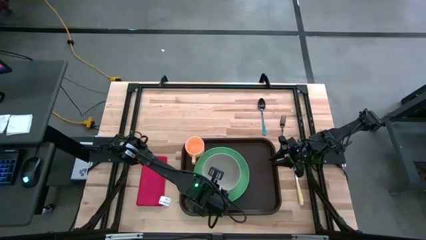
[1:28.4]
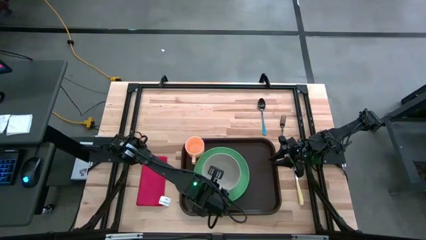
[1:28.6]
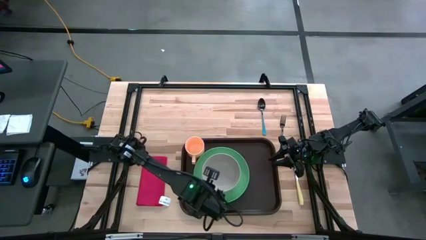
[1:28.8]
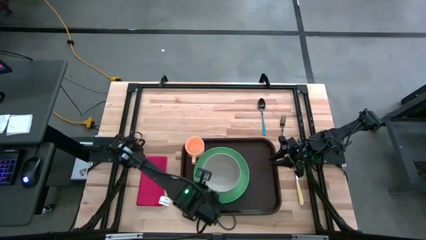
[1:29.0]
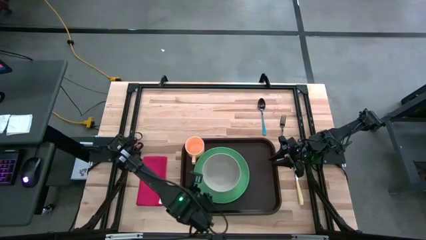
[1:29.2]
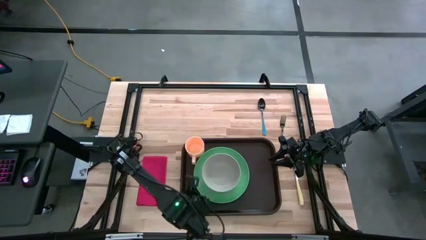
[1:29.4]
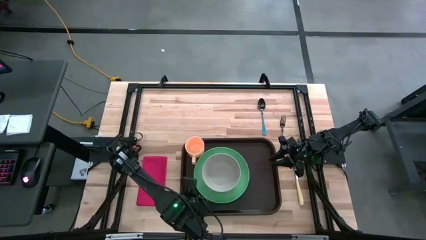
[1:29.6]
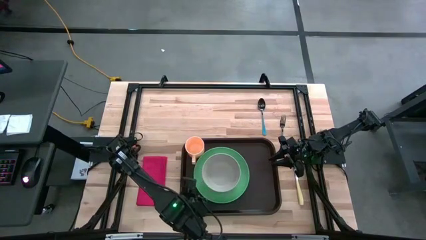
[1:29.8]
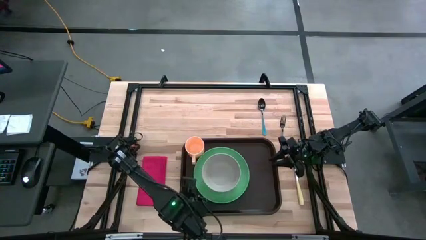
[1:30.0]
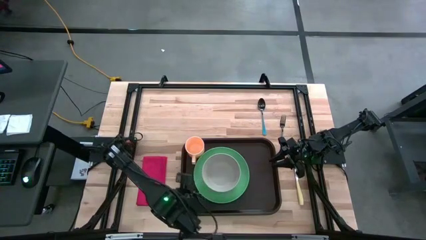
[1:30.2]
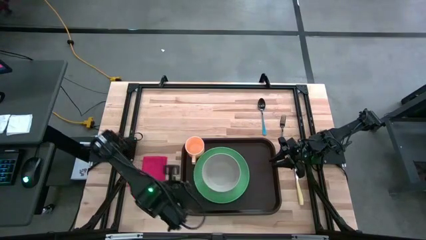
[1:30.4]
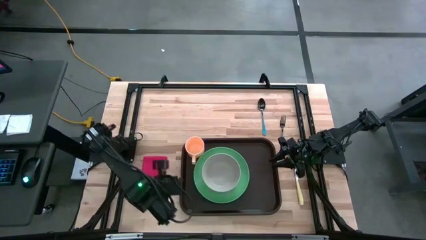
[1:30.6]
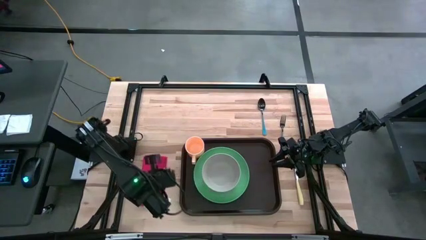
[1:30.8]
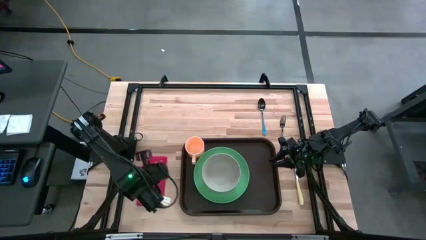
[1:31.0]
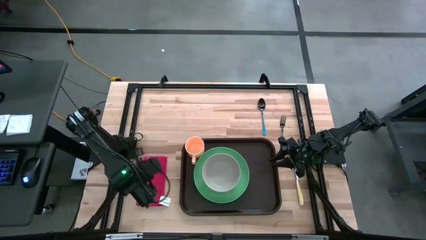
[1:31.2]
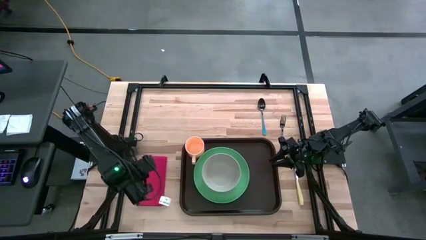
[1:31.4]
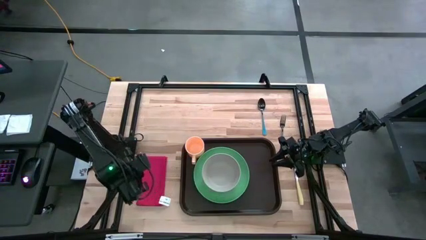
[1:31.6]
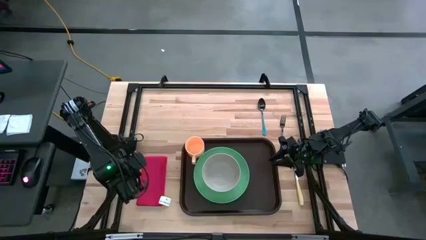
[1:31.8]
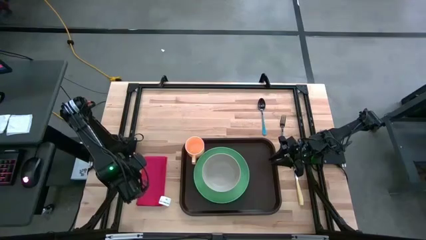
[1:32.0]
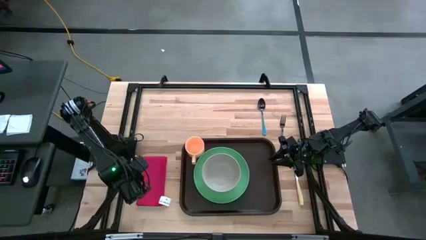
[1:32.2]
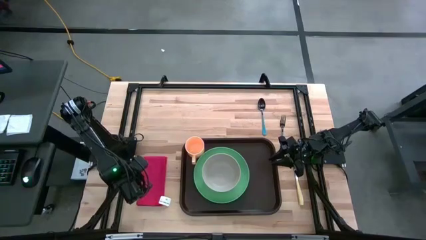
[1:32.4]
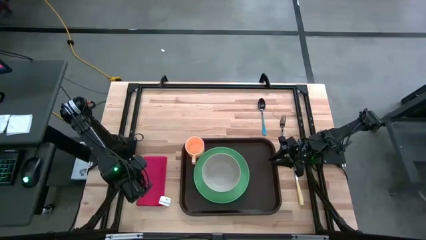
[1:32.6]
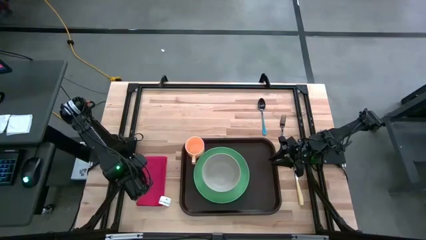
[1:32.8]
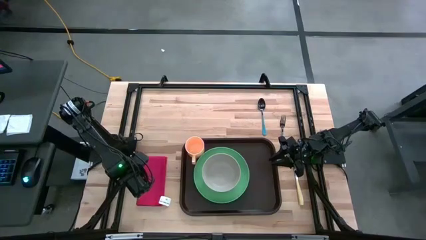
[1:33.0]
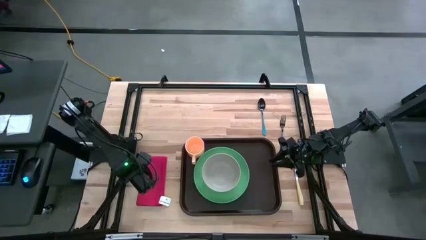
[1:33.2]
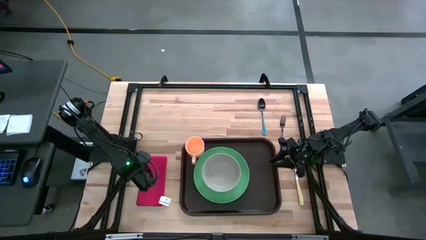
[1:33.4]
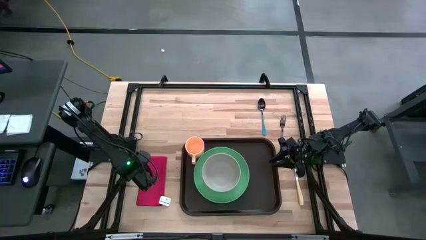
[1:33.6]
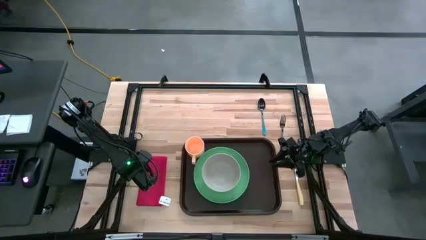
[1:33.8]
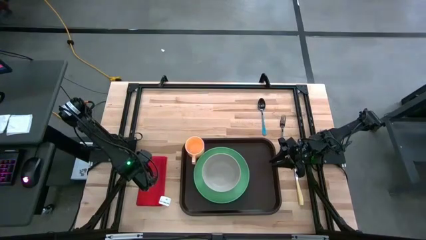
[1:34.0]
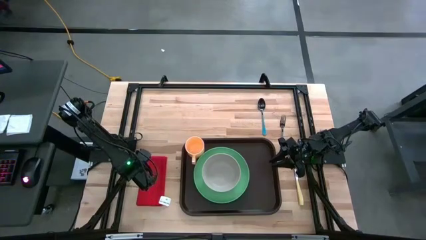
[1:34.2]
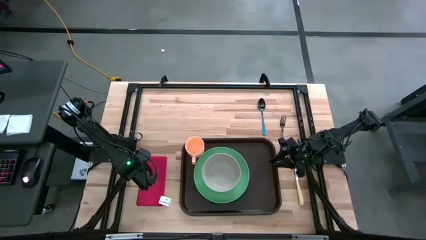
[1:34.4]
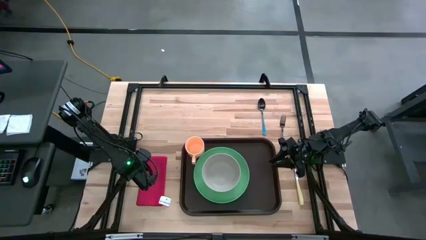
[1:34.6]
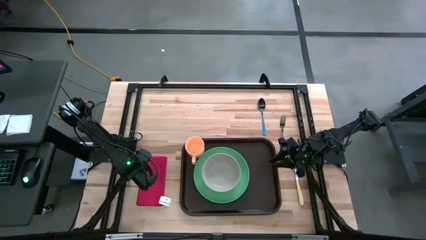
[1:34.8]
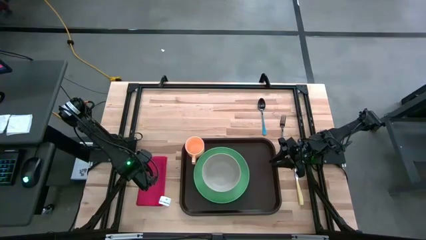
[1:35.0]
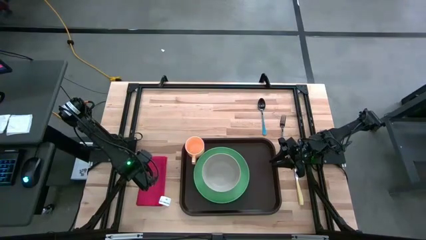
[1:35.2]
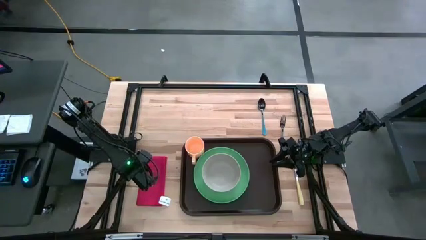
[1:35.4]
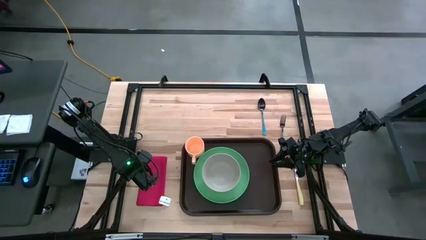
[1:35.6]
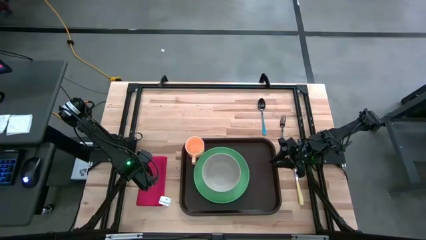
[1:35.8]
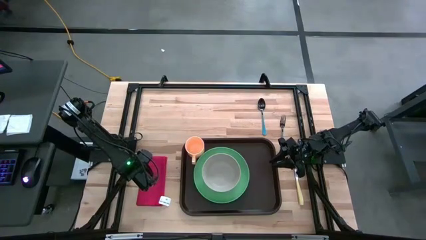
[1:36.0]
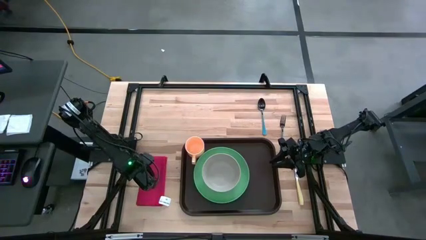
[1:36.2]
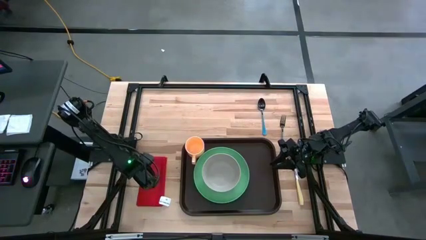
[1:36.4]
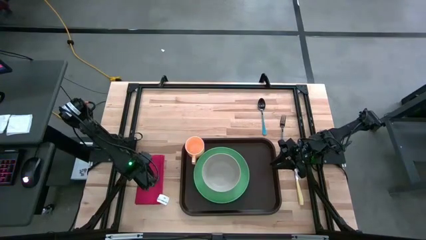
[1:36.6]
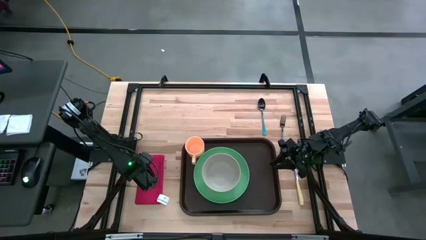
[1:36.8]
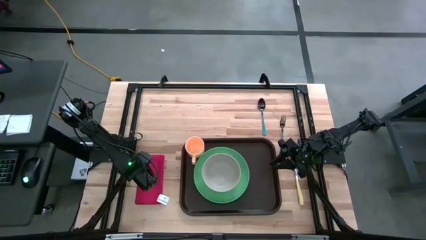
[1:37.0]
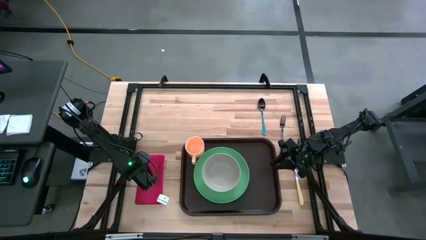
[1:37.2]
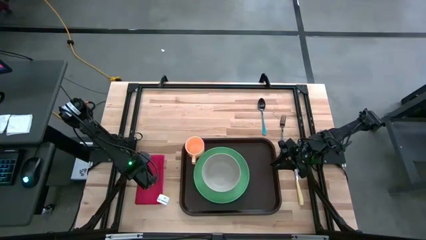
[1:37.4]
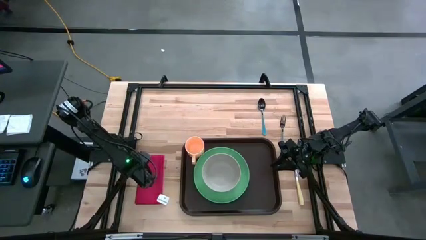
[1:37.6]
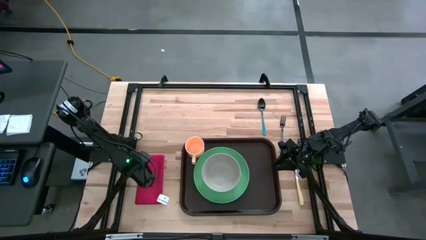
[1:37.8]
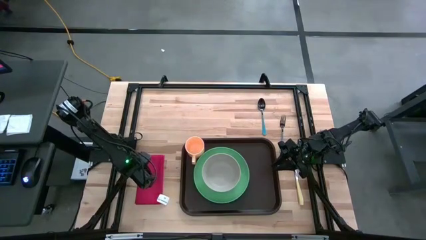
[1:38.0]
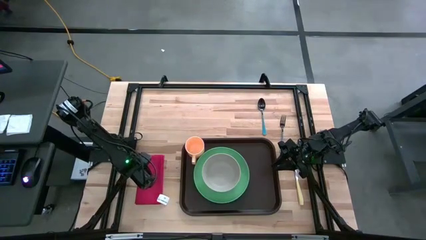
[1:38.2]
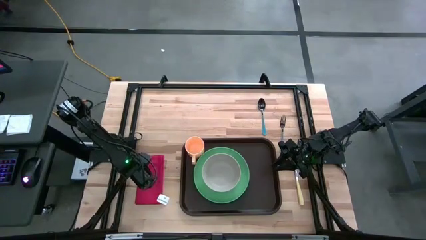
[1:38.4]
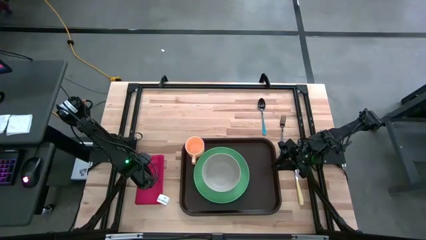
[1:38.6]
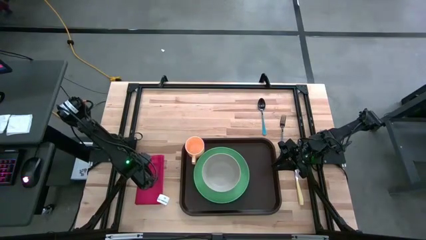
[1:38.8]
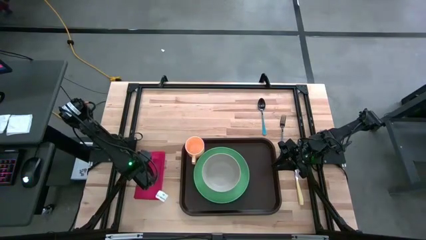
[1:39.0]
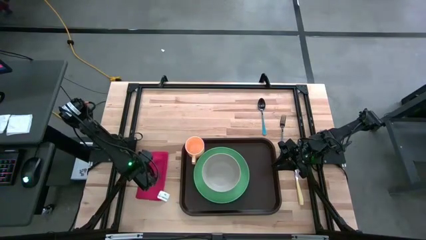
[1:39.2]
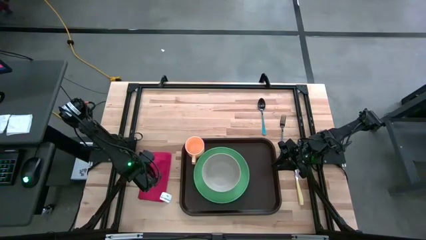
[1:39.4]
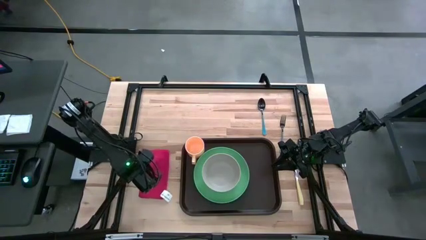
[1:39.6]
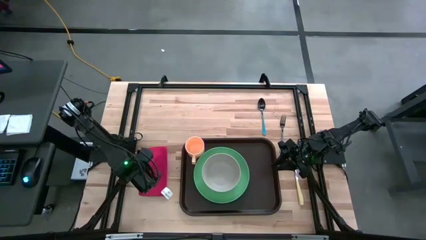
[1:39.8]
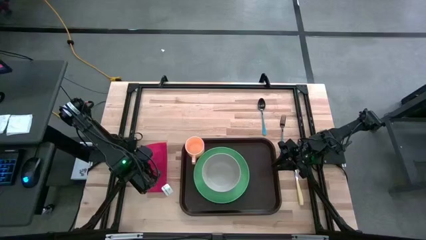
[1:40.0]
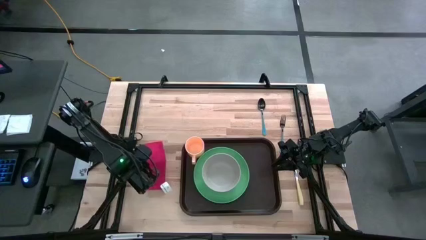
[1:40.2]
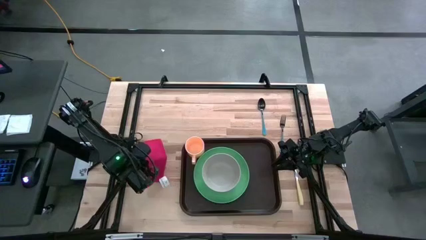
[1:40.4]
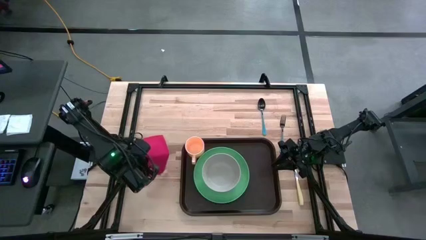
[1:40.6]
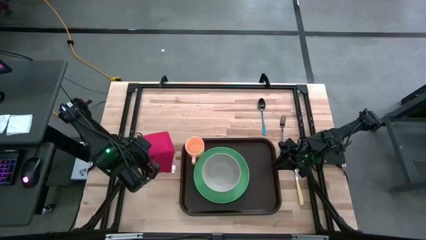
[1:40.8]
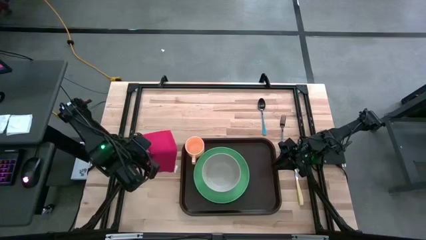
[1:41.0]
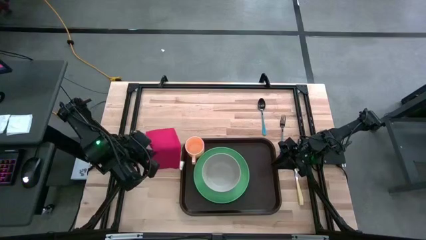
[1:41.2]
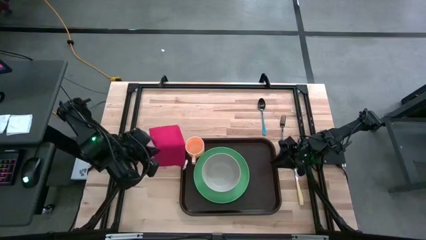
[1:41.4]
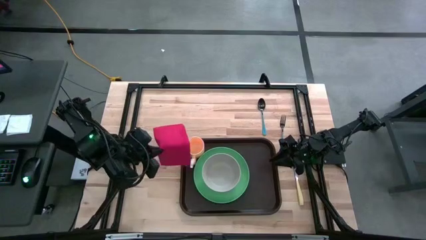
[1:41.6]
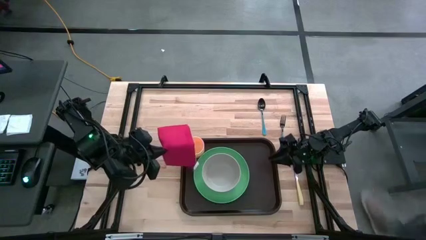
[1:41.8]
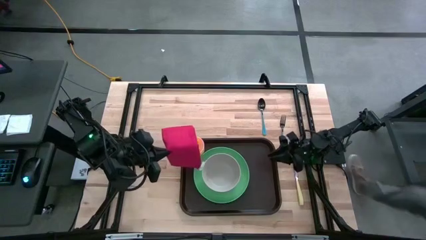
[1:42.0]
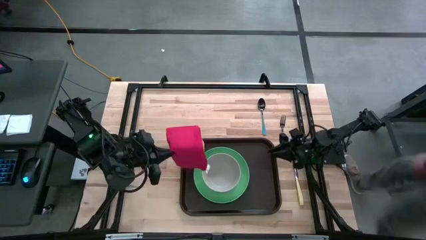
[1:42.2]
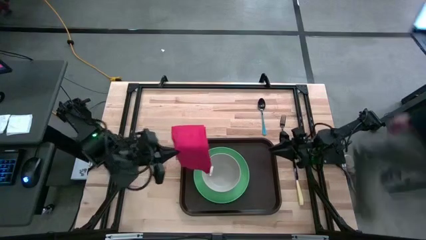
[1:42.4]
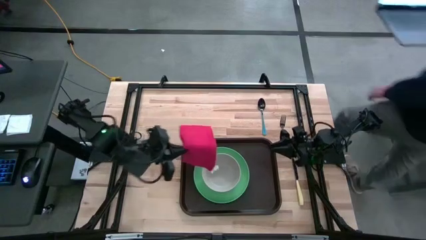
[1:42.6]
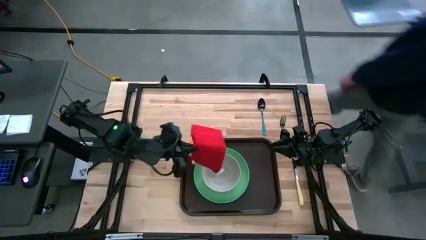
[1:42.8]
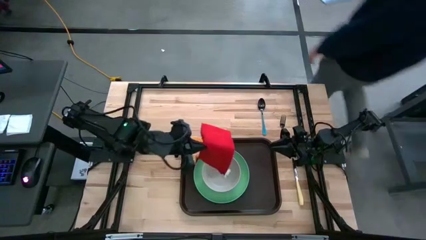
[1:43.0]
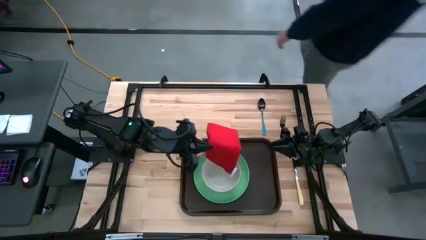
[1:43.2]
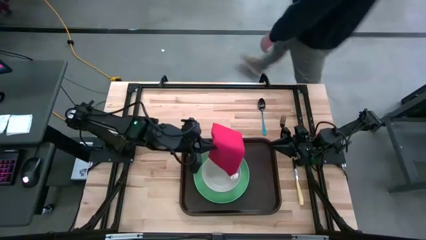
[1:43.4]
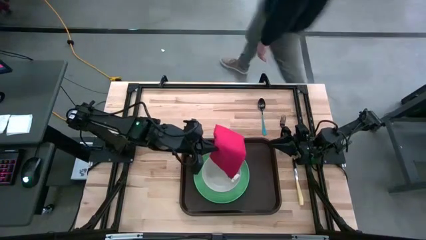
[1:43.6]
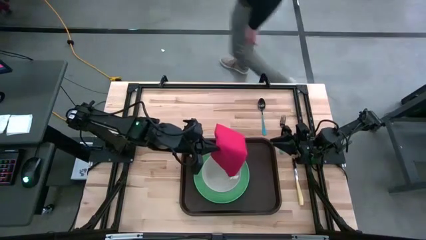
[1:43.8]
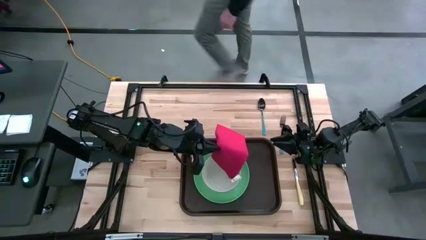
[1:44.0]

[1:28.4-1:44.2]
Task: Set up tray
Put the red table napkin on the black tray to the right of the green plate
